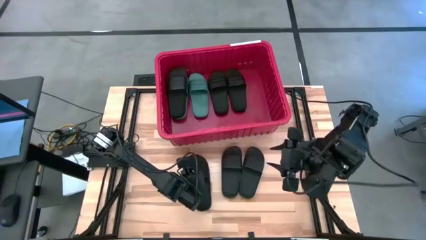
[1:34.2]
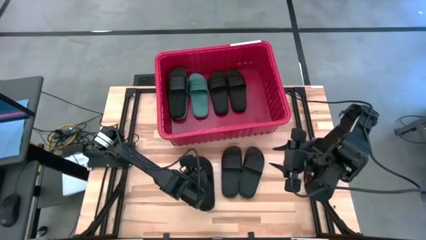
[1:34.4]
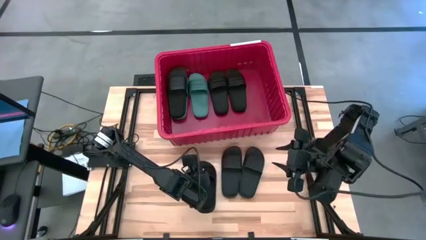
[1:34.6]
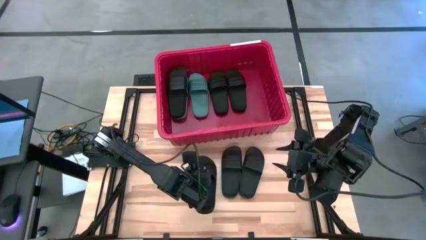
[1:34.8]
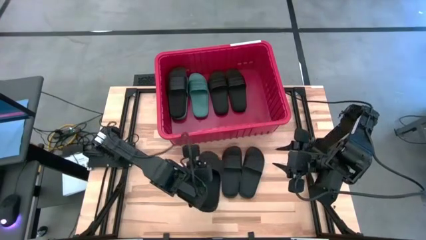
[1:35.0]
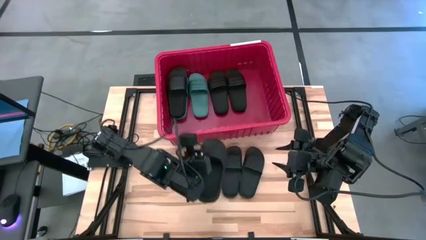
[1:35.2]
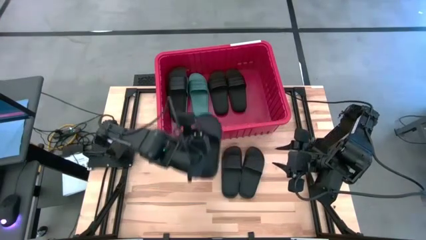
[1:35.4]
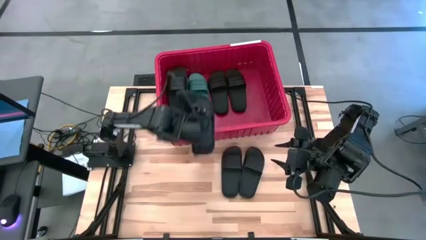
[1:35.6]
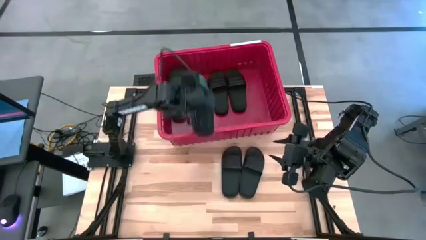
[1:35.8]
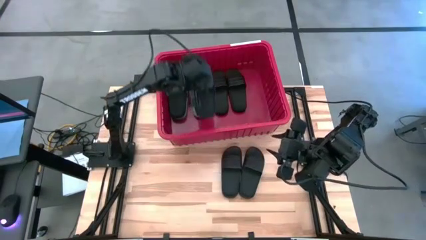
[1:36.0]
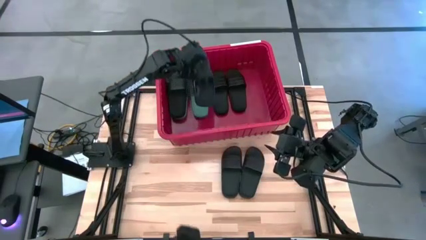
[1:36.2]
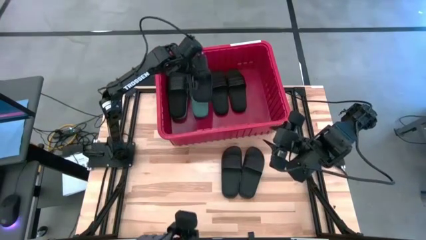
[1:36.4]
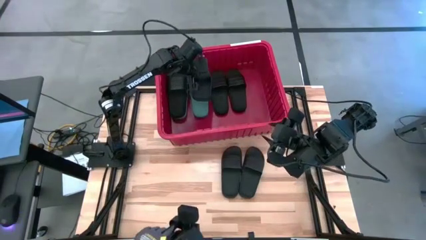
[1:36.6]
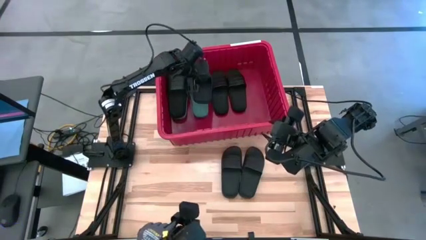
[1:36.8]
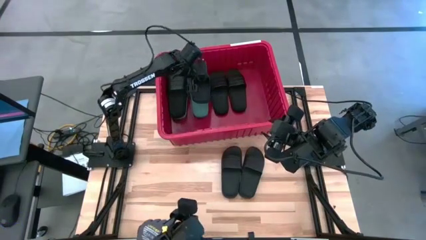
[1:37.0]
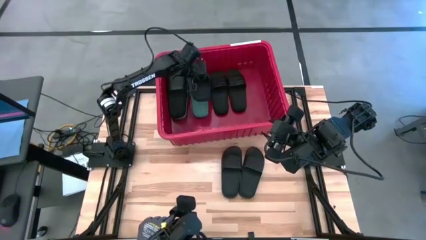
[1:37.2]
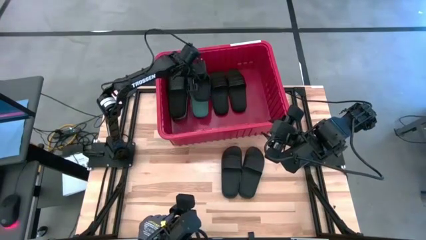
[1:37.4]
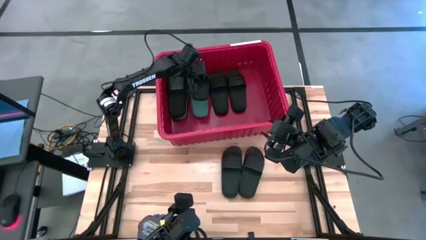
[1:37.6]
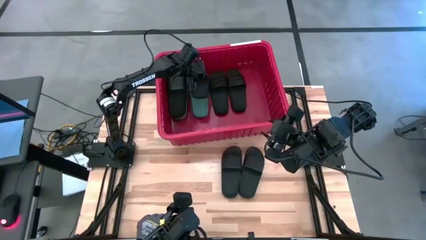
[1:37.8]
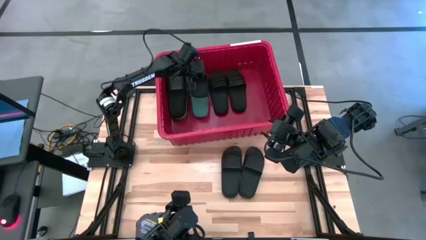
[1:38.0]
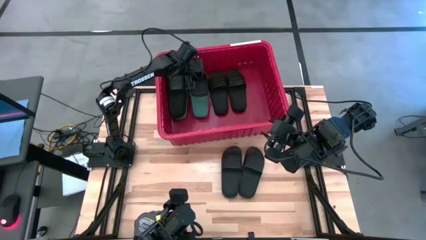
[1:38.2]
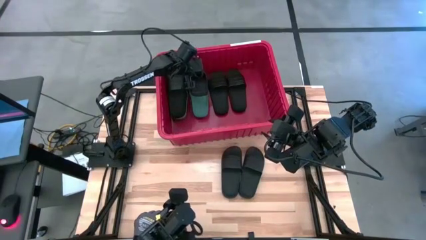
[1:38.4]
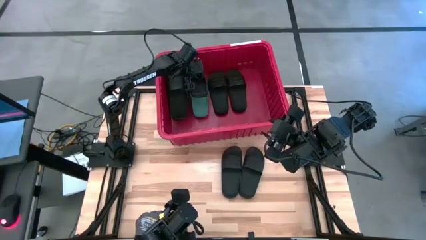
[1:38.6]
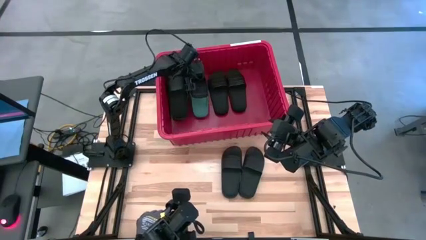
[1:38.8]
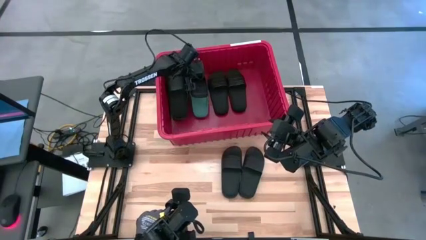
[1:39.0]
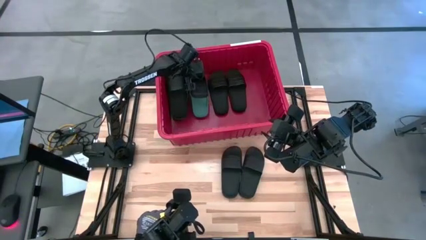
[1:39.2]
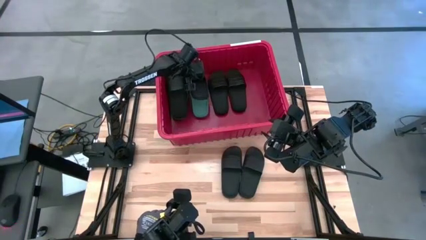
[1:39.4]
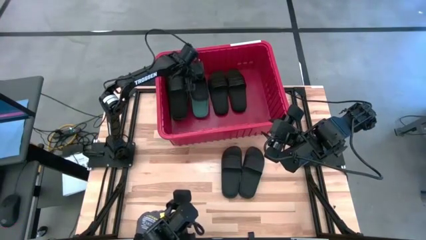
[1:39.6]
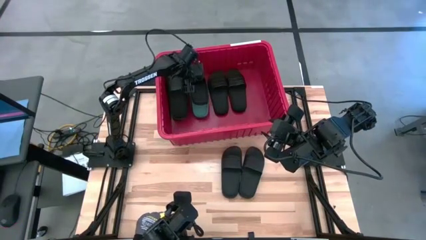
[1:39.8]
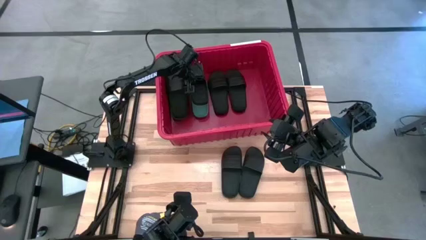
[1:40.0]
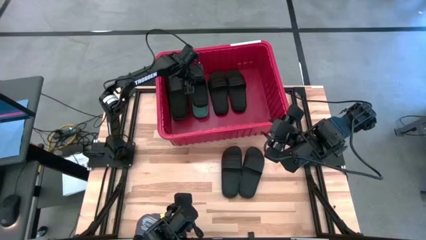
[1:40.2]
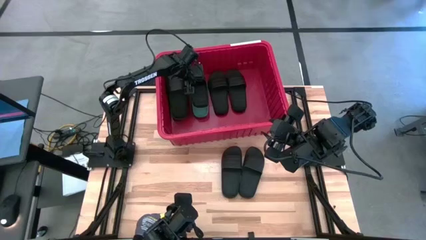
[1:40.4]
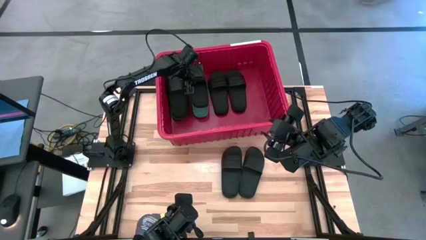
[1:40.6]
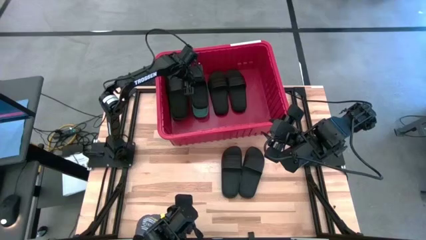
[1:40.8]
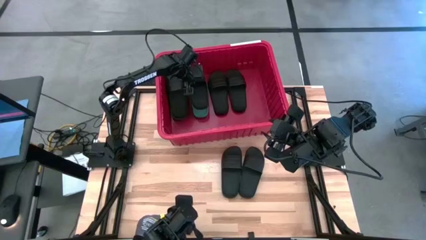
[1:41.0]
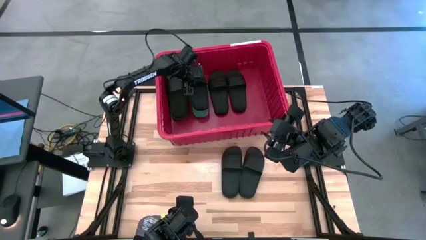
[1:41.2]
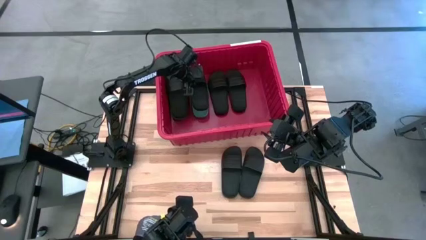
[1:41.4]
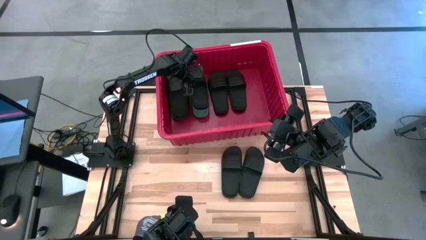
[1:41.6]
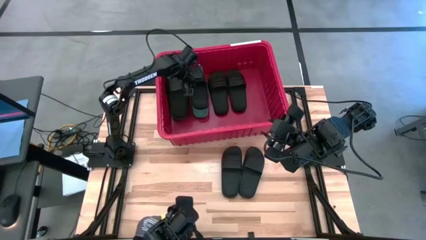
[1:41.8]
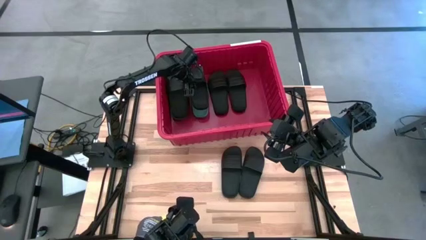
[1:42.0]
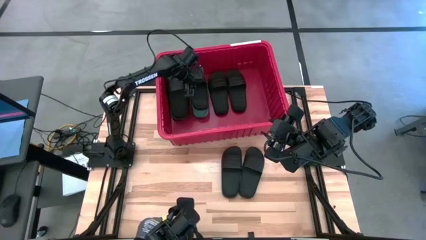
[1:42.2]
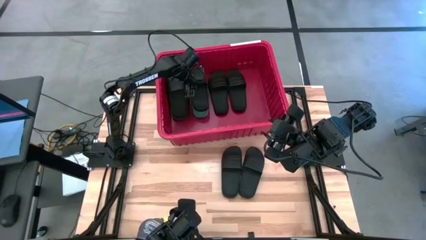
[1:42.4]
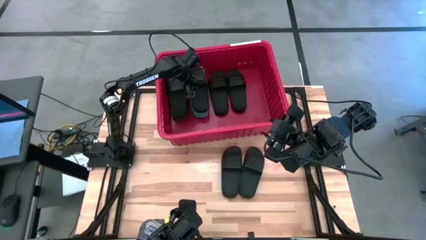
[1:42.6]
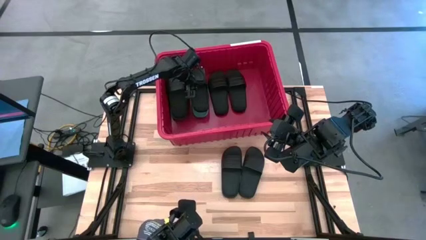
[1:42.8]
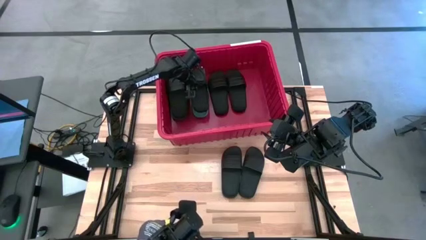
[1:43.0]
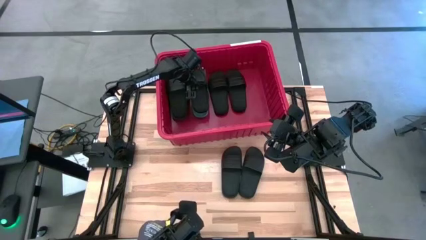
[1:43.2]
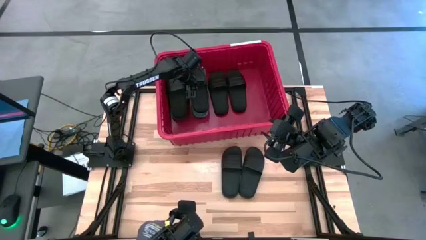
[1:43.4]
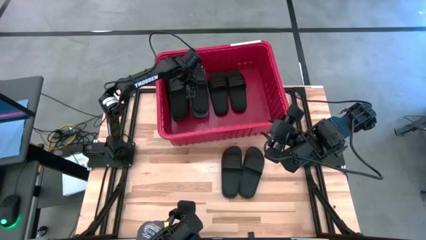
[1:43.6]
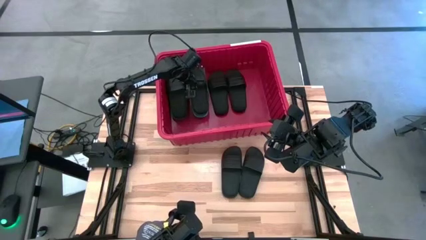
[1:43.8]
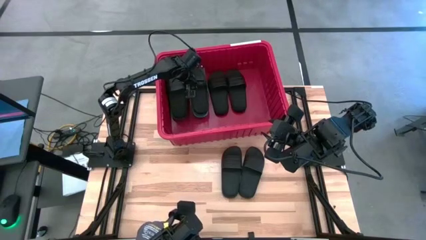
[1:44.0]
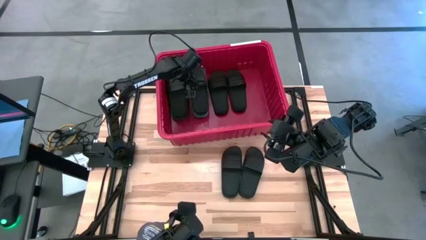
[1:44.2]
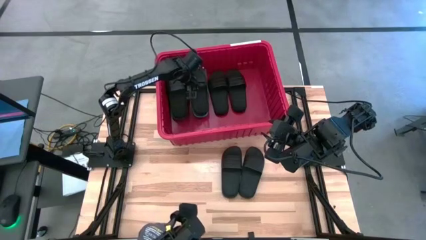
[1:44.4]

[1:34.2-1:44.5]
Task: Pick and place slides into bin
Put the black slipper into the red container
